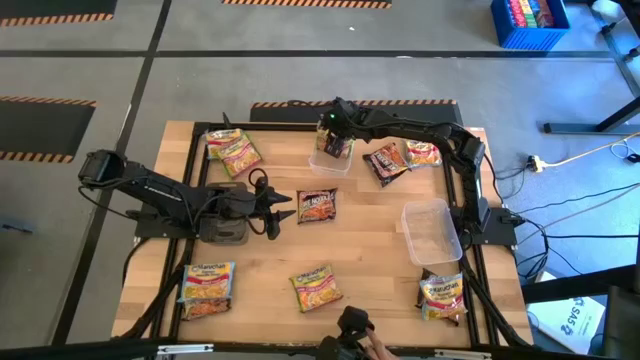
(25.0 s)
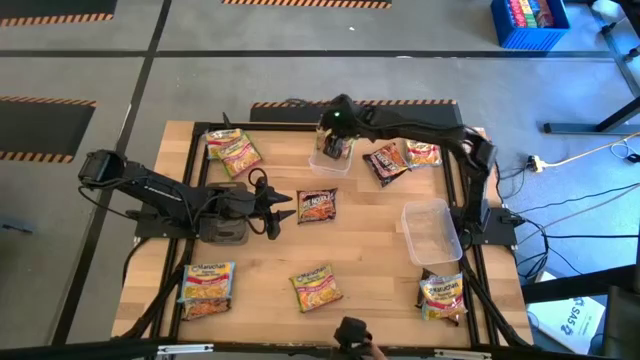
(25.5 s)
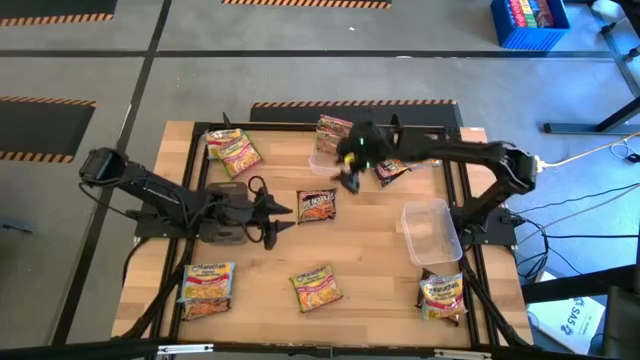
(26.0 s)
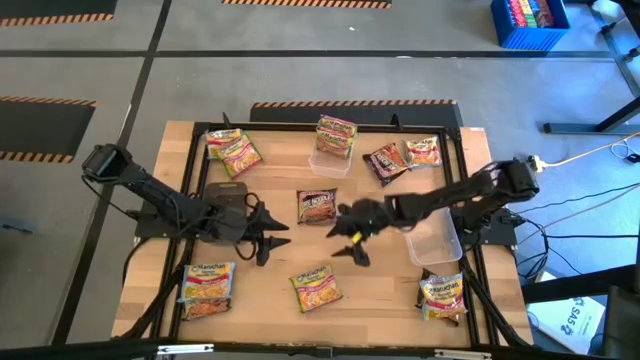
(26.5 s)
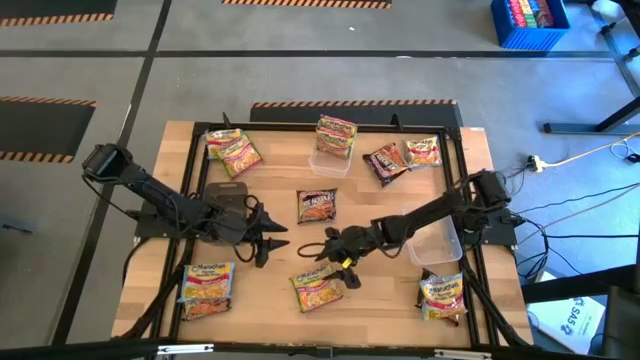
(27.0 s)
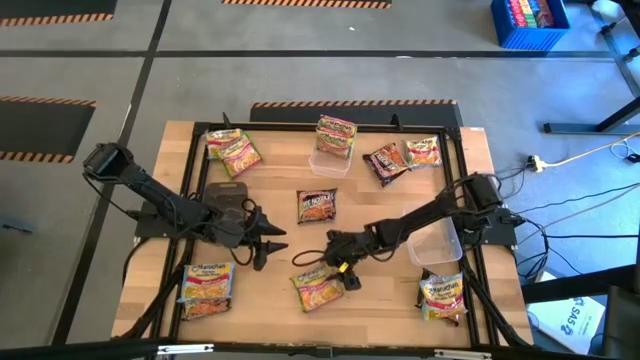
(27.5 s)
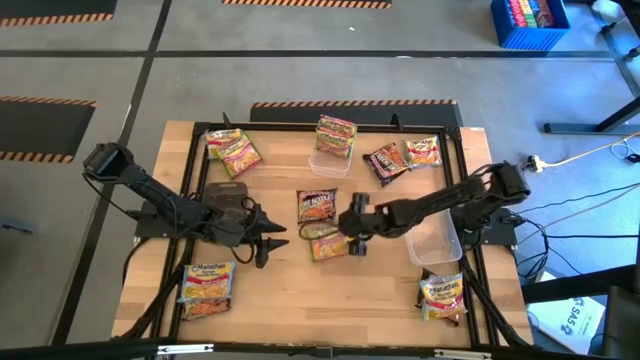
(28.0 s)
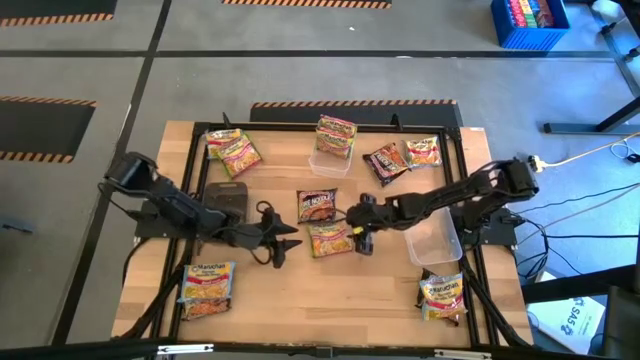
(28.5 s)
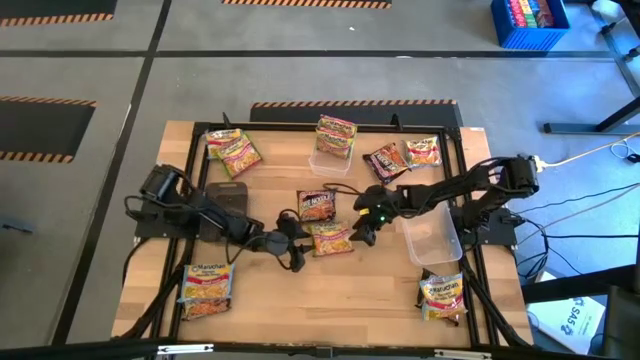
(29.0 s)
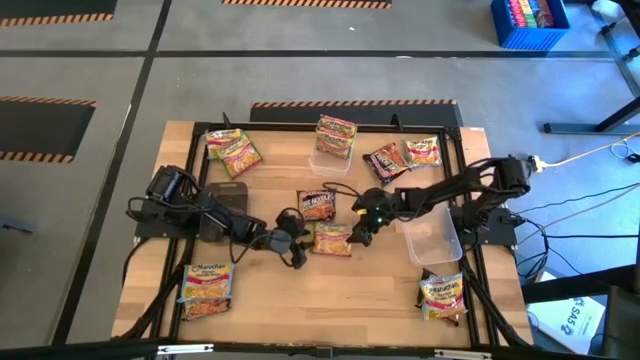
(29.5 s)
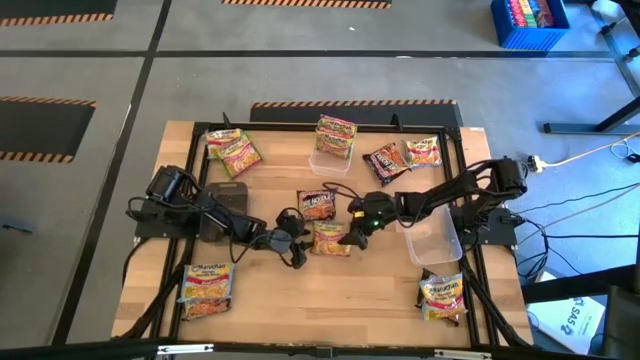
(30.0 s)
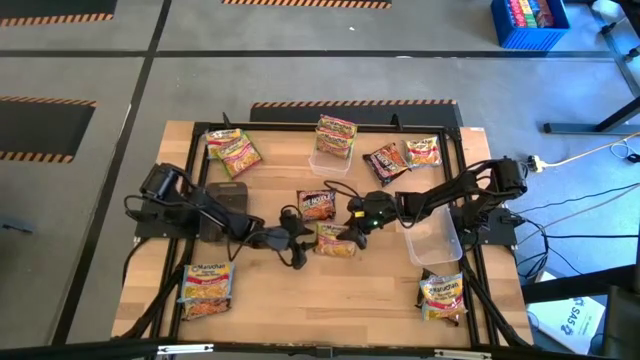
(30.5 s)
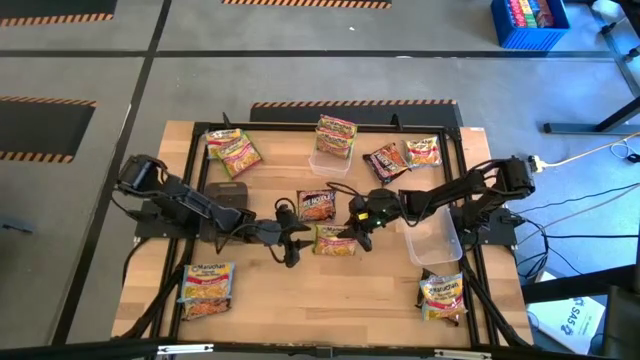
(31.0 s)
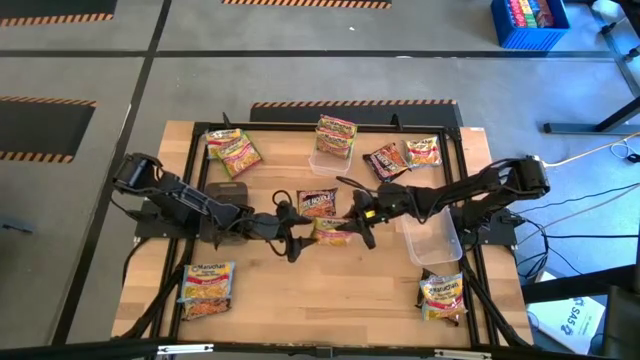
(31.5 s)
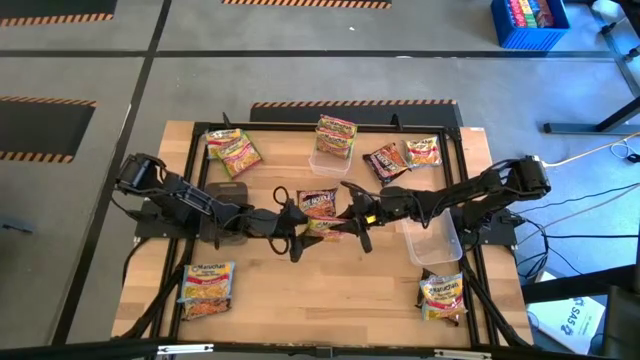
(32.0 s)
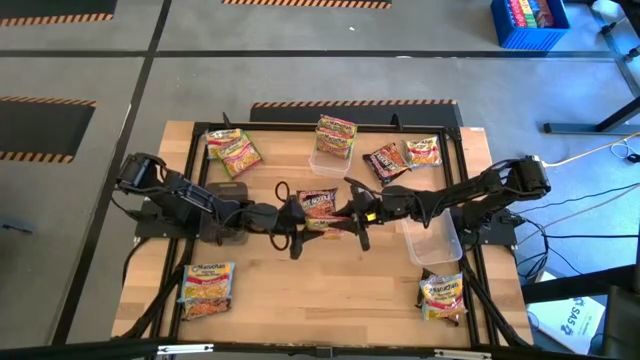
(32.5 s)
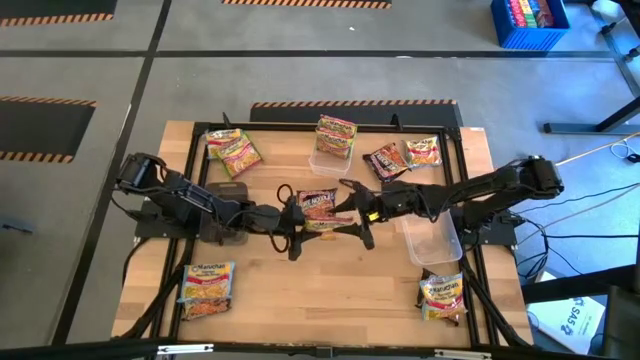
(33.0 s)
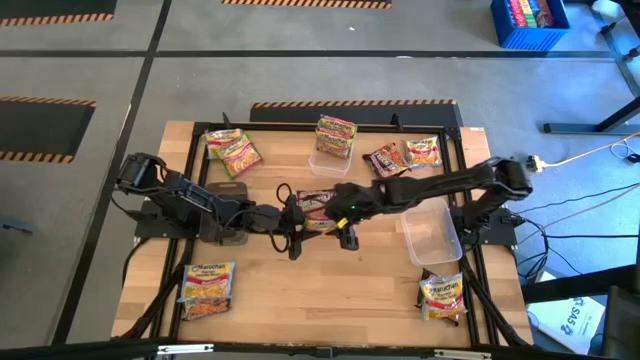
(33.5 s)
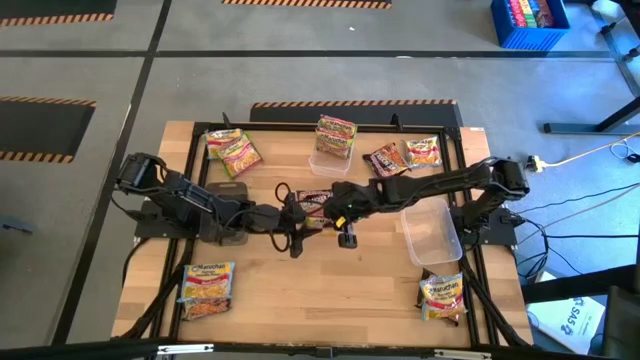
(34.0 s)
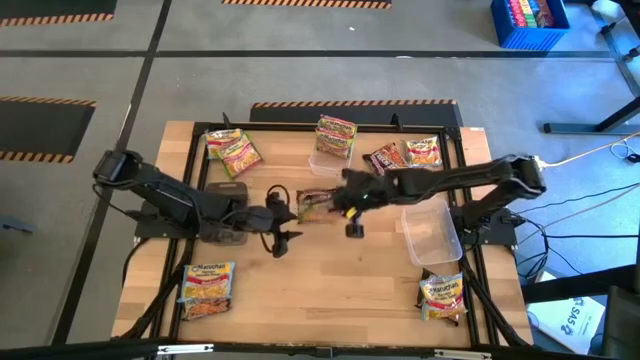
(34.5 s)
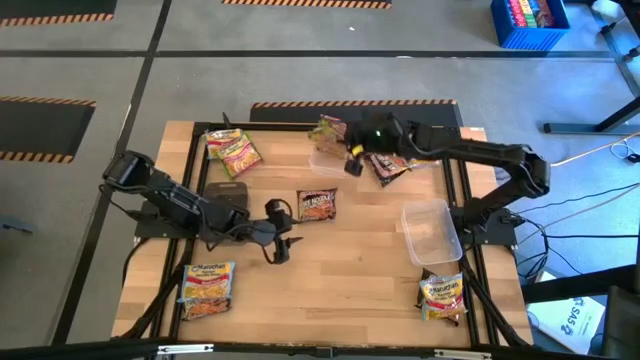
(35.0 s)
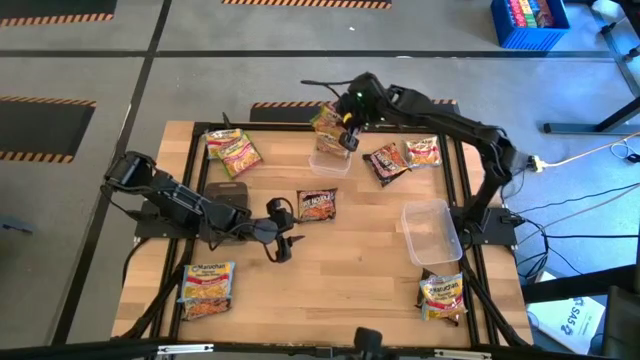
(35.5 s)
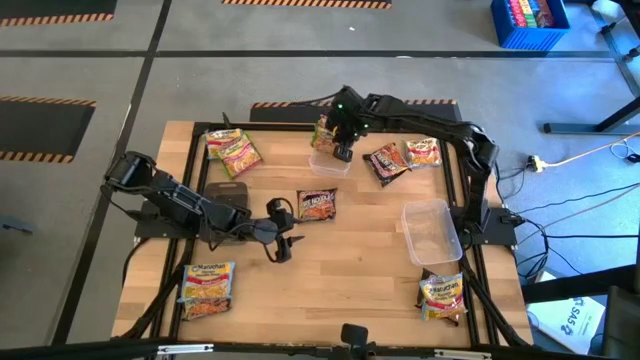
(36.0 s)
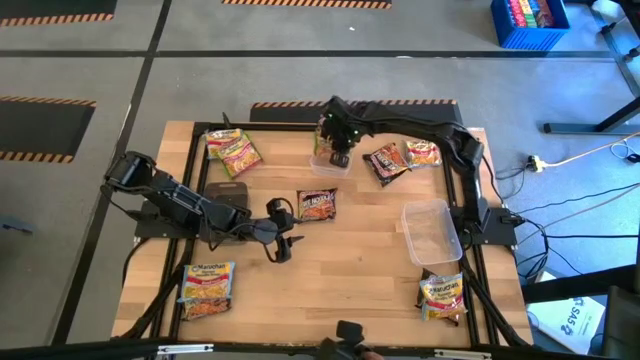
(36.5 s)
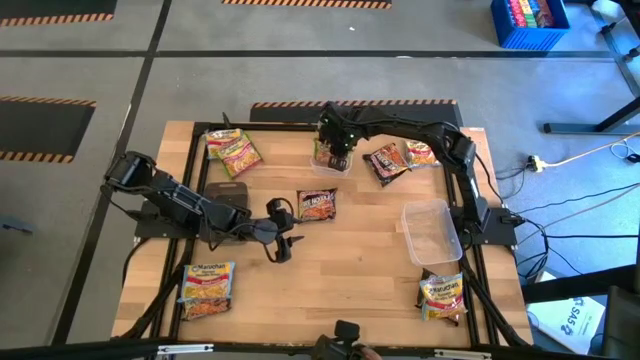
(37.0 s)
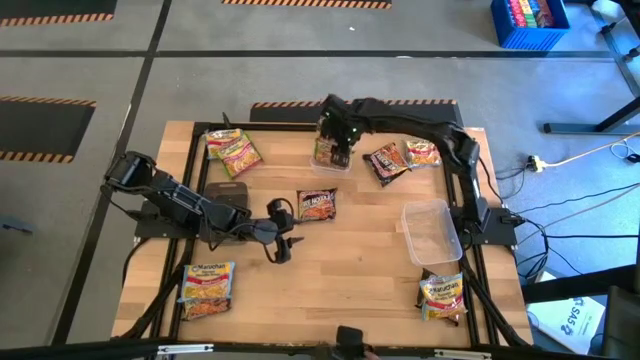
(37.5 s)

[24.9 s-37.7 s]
Task: Sort Maruchan noodles
Put the bottom green noodle pack into the top transparent bin

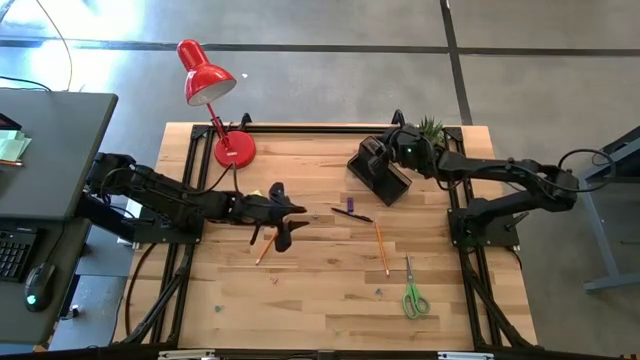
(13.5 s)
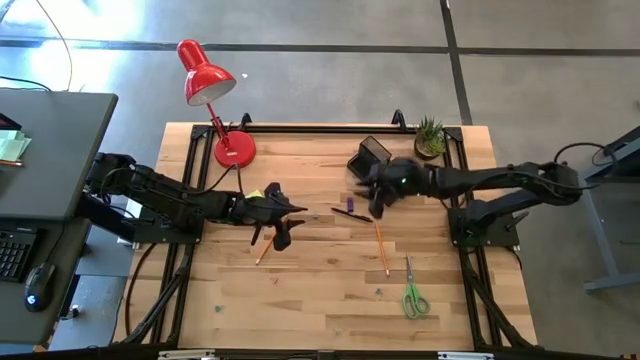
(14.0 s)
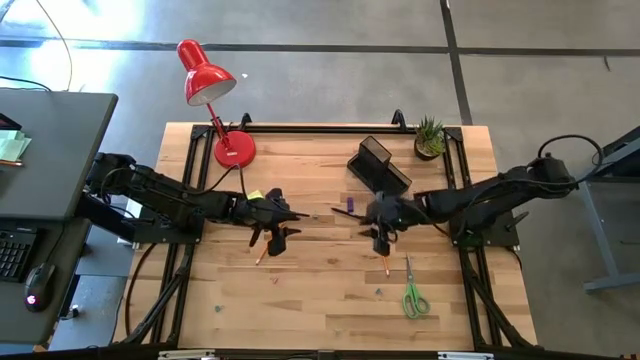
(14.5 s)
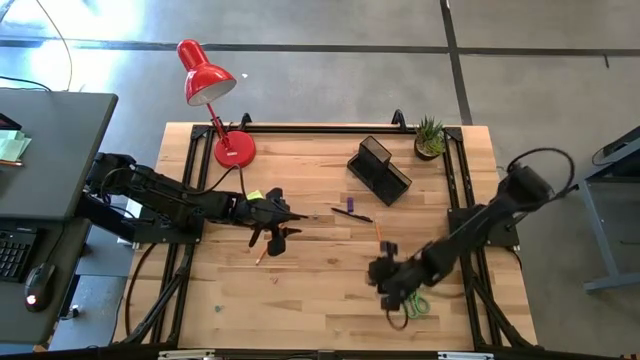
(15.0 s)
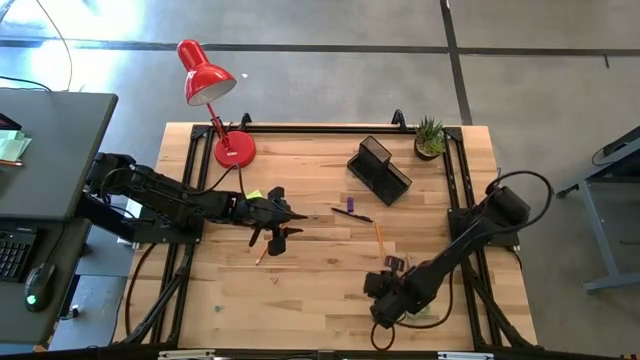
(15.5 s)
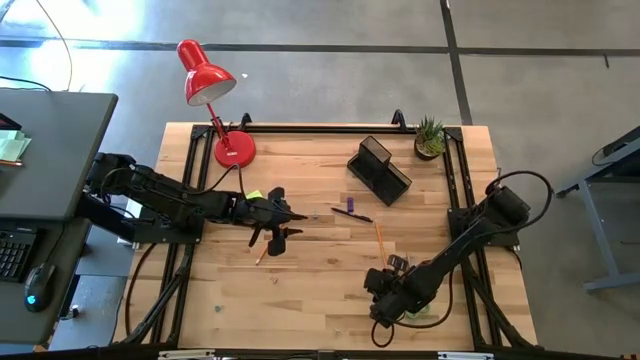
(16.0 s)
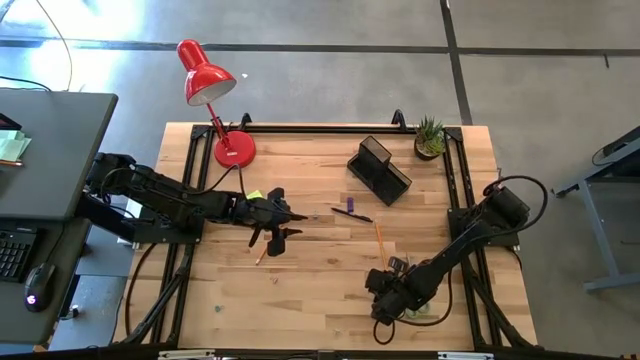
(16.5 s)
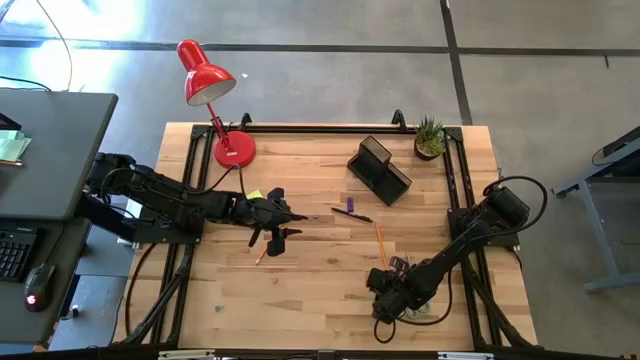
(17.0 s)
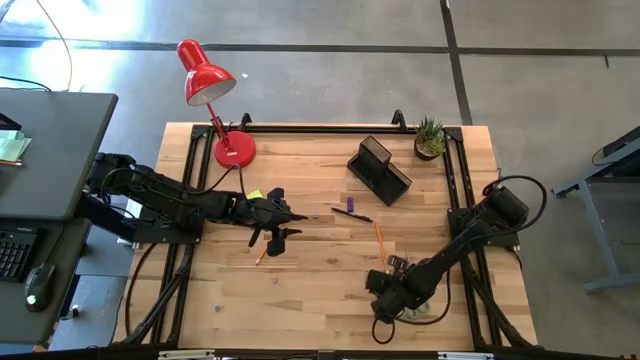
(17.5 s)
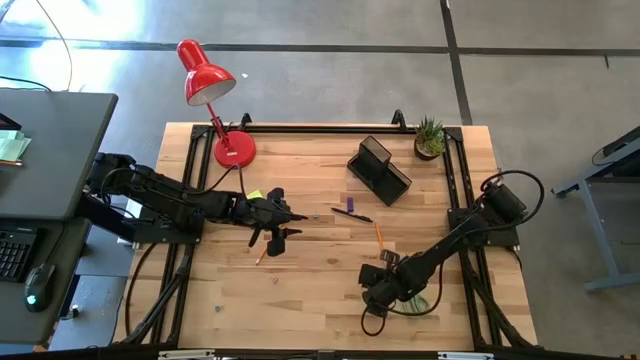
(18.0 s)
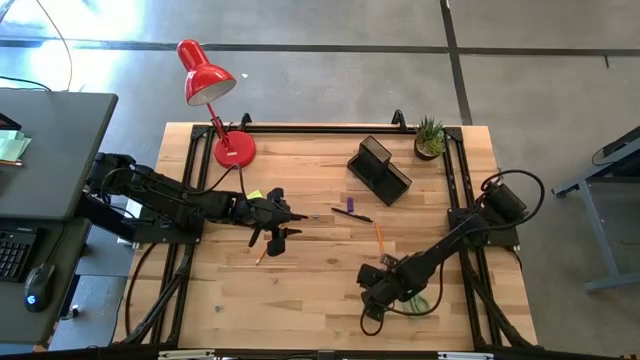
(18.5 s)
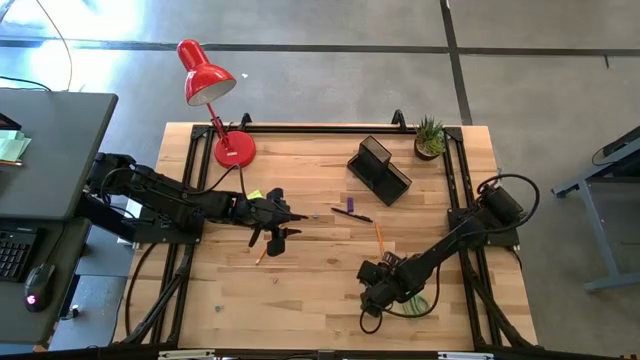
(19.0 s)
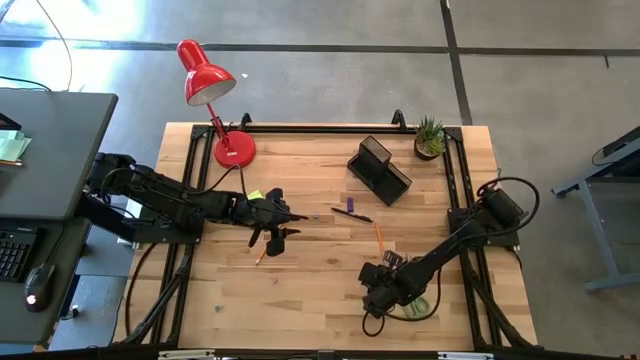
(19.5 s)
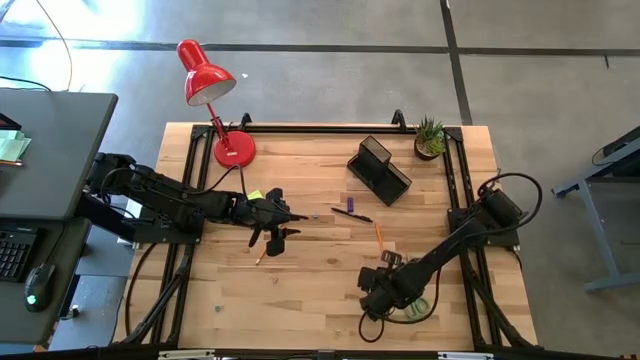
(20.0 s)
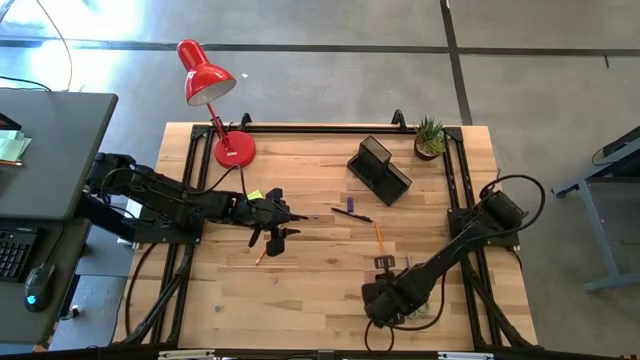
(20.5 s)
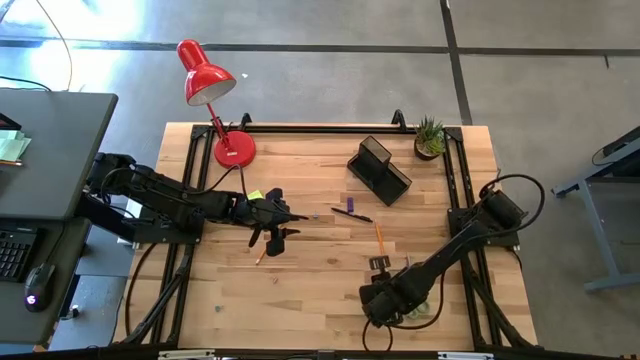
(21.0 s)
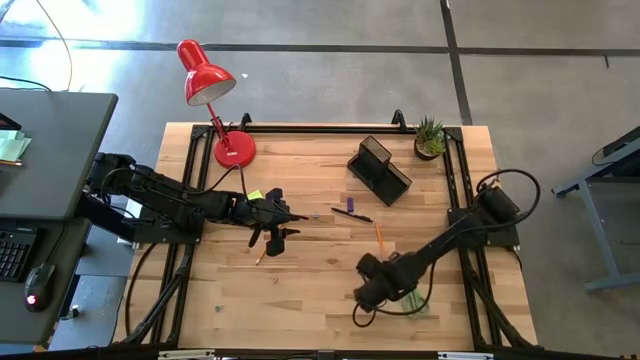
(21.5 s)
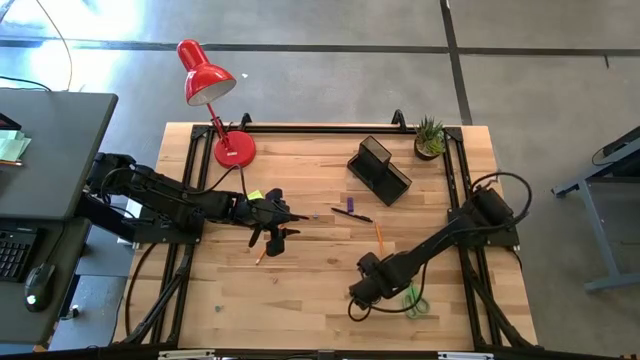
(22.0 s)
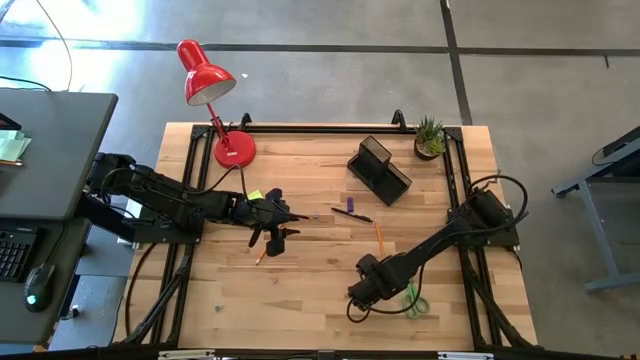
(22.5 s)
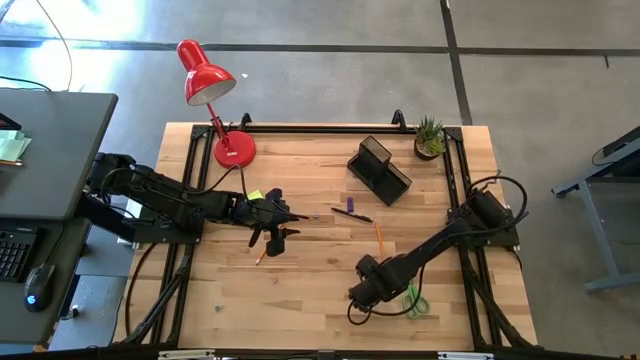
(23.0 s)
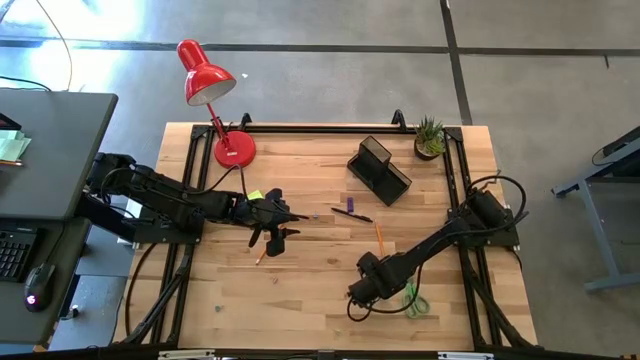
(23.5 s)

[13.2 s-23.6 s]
Task: Pick and place office supplies into organizer
Put the right blue binder clip into the black desk organizer
